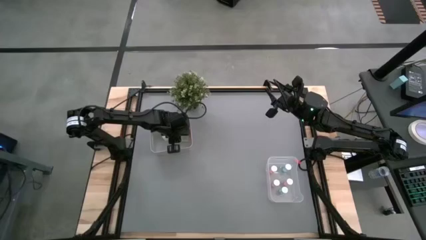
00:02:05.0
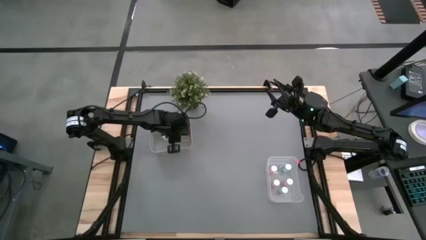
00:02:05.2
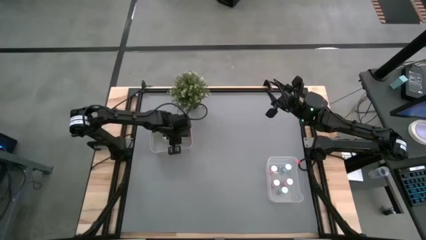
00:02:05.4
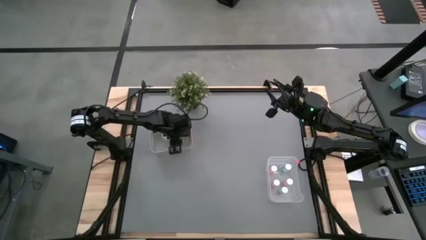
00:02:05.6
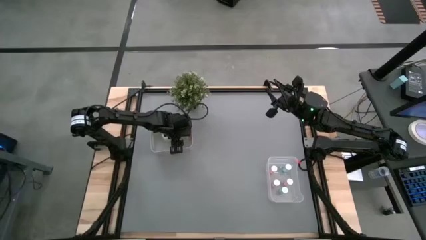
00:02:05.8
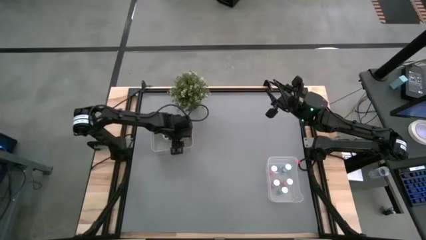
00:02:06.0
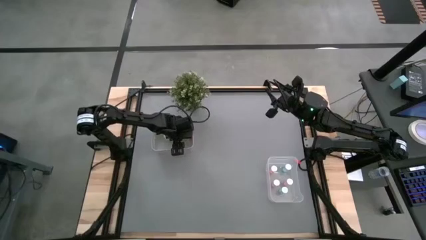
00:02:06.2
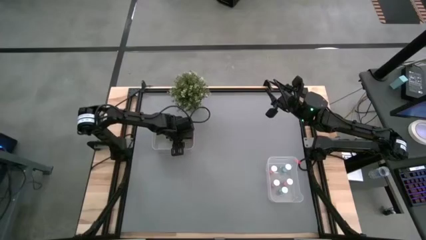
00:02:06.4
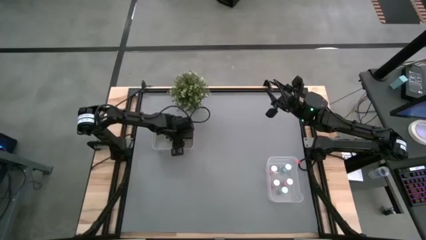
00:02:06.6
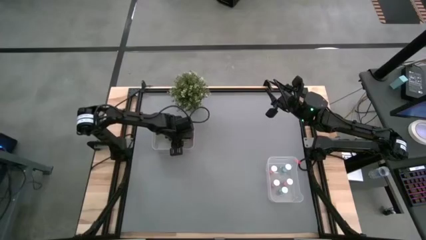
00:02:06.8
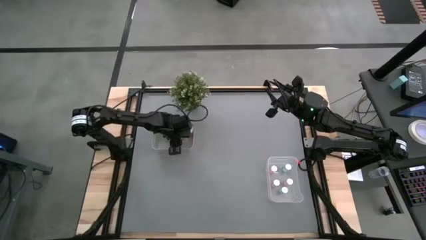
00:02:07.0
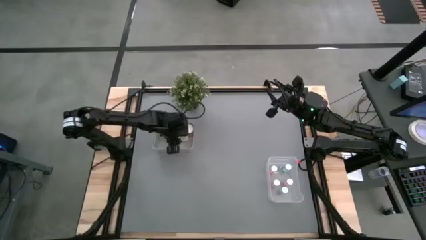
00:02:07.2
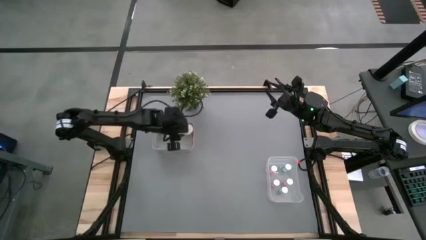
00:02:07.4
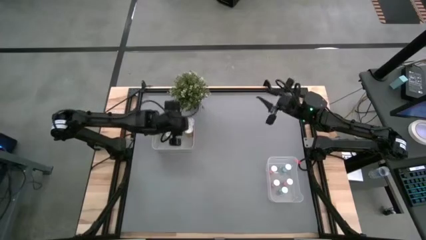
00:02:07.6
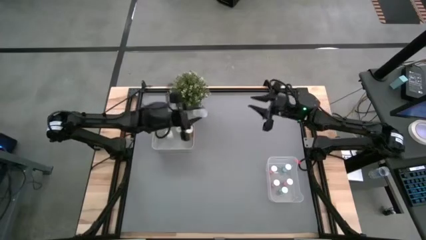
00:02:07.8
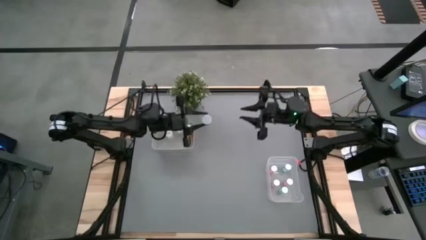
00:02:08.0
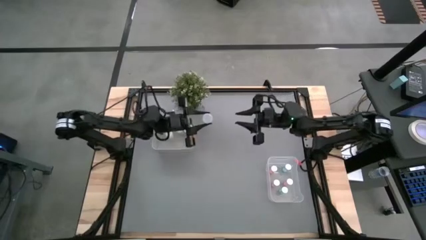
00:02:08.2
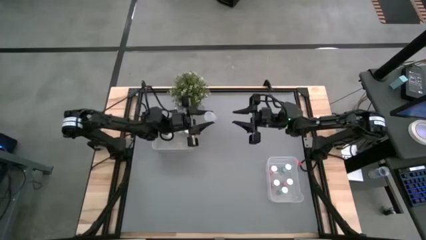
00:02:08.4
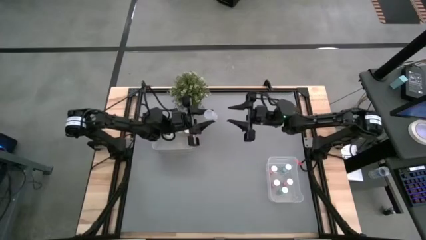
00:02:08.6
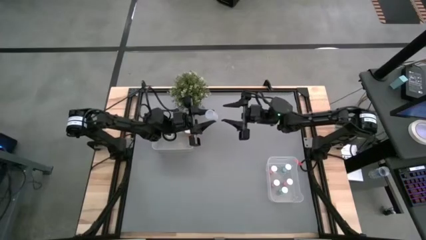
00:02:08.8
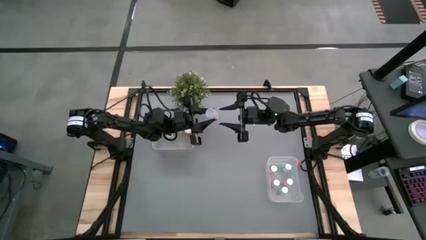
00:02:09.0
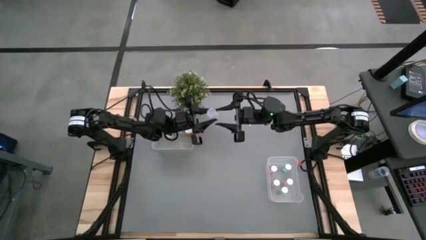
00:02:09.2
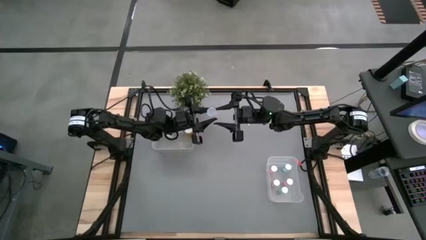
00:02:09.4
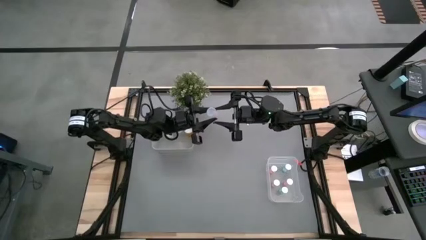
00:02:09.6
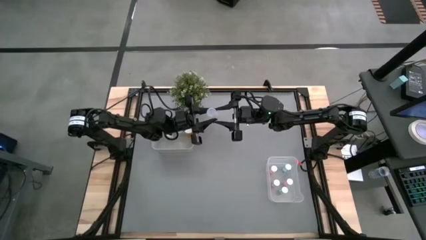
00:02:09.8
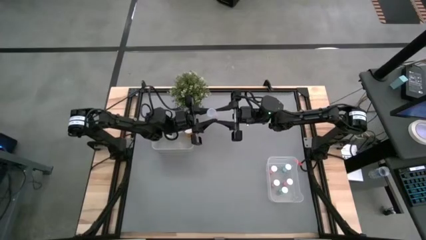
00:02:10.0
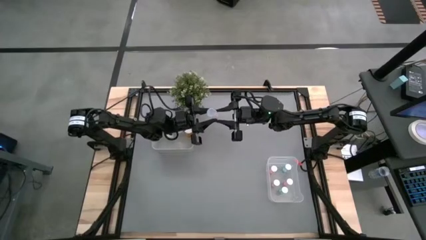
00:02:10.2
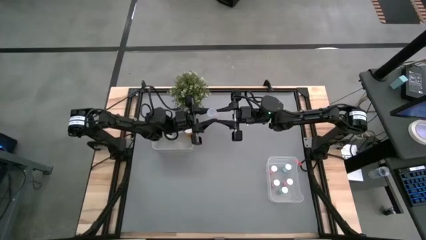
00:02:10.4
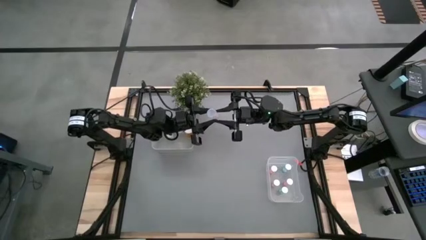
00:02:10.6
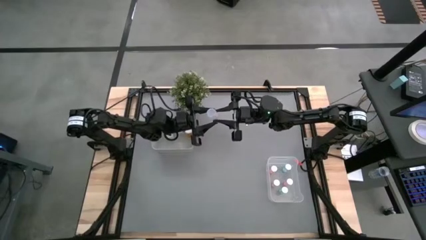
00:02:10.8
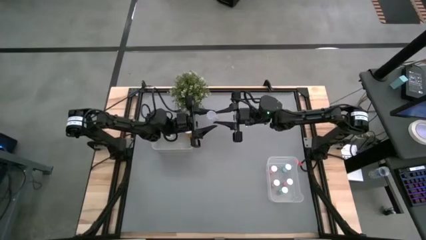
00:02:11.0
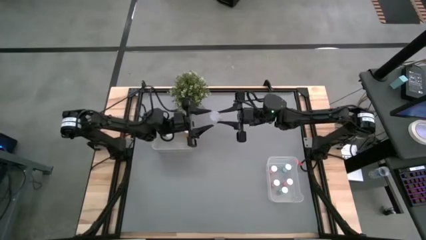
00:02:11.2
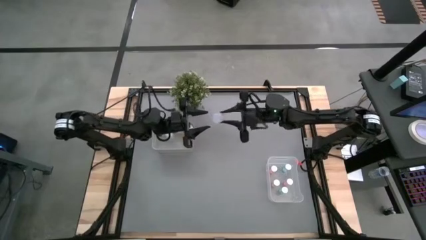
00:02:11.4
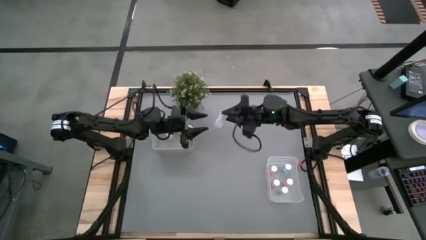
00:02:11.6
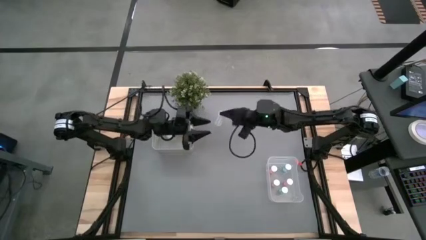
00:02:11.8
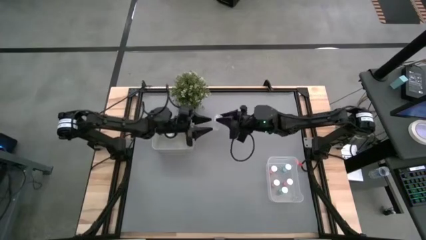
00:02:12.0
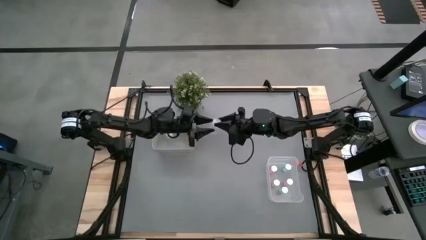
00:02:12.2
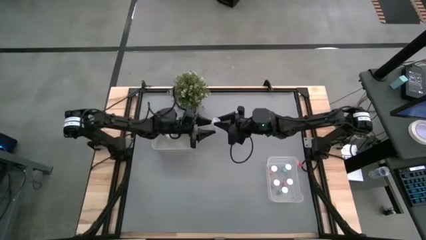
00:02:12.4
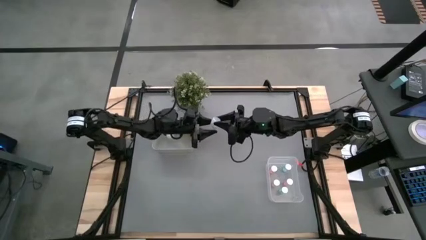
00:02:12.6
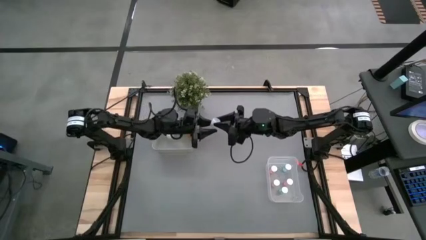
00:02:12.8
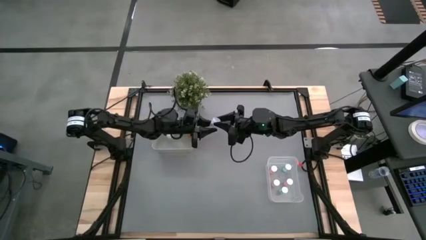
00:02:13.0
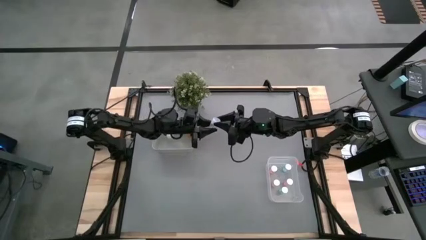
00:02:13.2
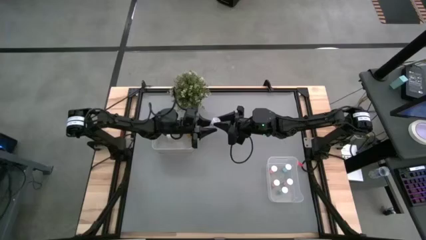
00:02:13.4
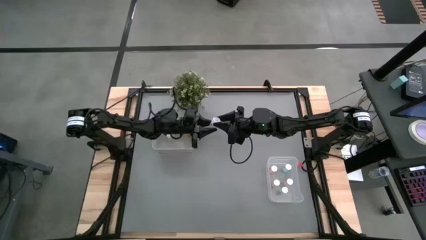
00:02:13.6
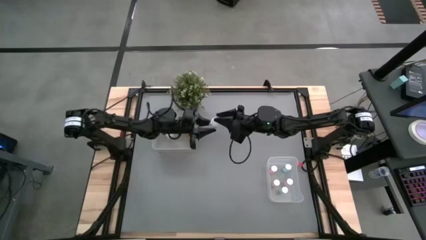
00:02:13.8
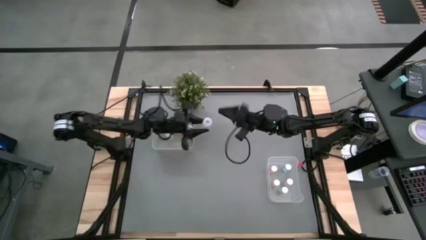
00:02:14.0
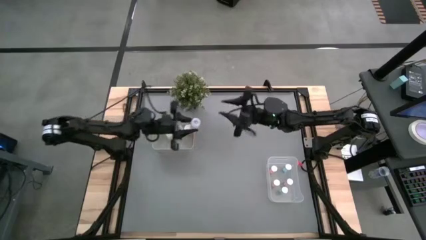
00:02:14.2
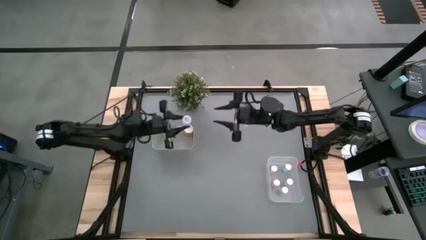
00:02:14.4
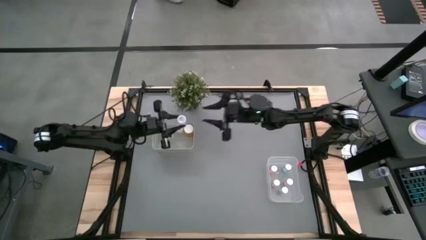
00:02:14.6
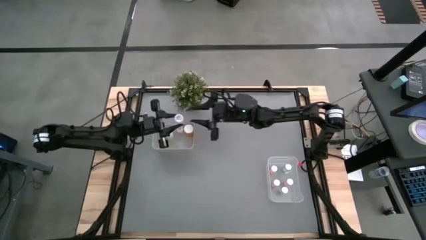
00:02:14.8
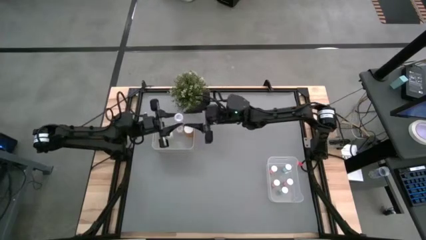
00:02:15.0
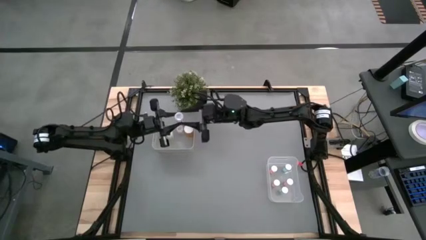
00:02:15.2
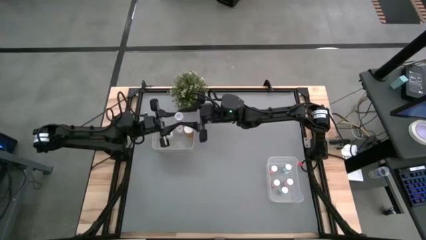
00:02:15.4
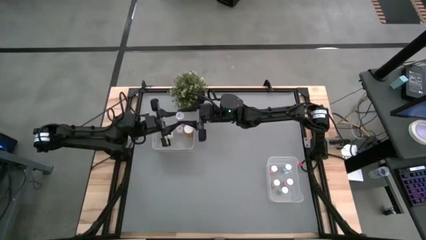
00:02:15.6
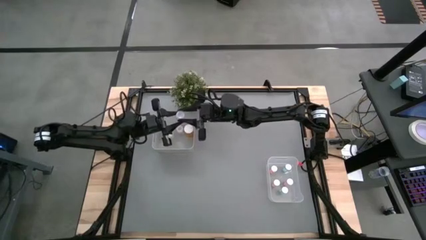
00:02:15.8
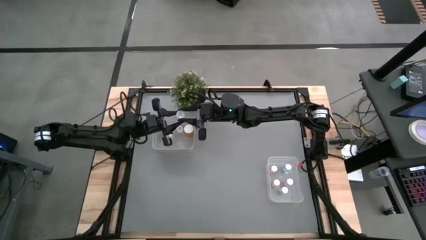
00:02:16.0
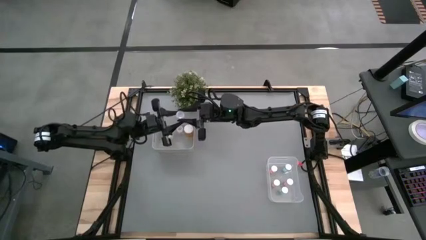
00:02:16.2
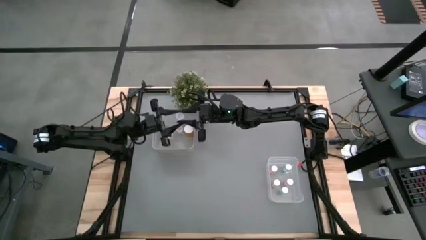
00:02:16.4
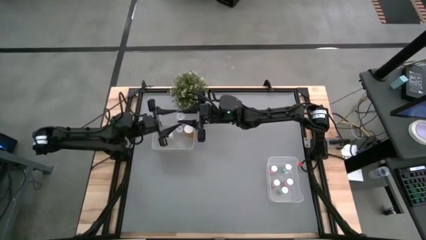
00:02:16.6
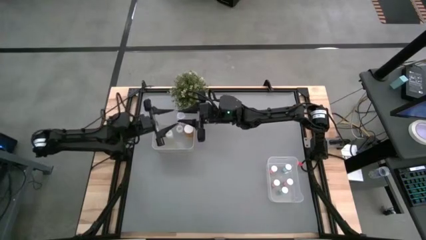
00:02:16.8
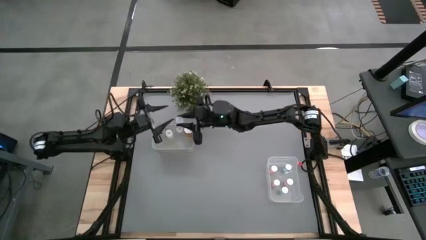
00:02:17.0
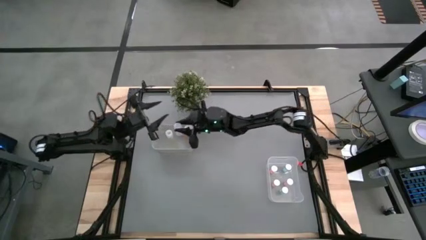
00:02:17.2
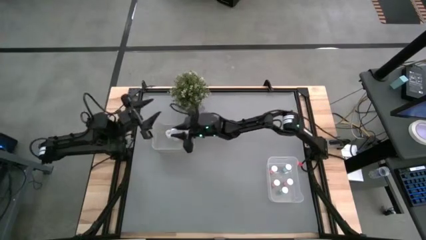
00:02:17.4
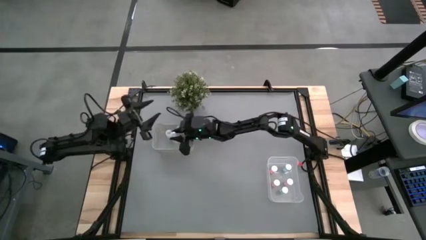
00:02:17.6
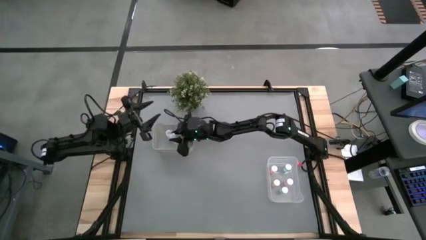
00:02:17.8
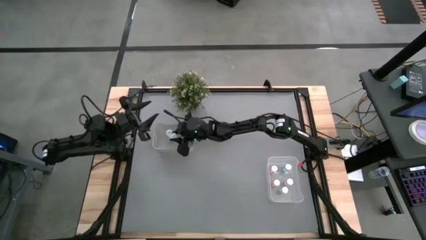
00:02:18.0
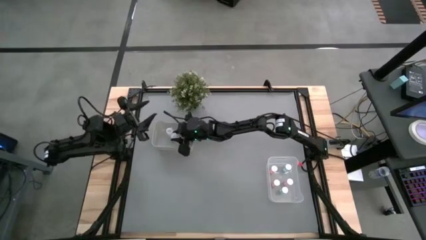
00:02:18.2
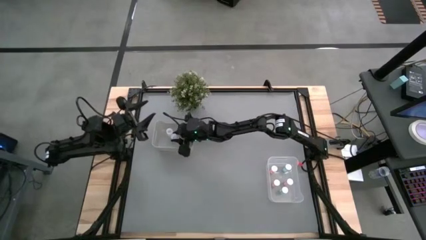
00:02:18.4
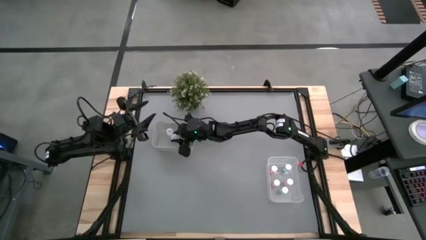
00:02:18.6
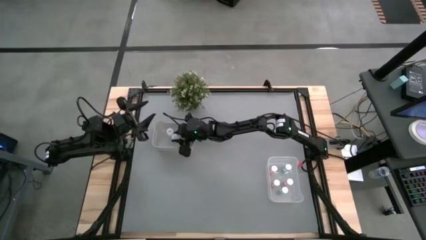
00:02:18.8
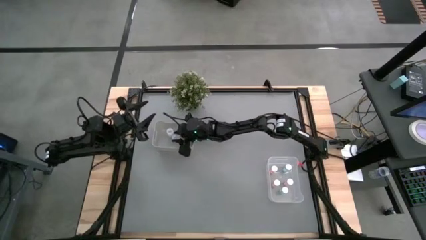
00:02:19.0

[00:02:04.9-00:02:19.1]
Task: Pick and place medicine bottles into bin by pill shape (circle, oval)
Put the transparent pill bottle into the gray bin

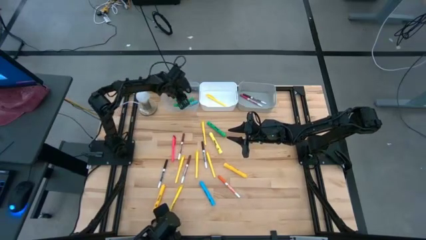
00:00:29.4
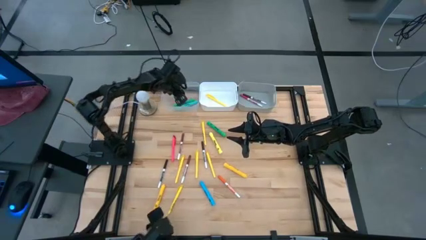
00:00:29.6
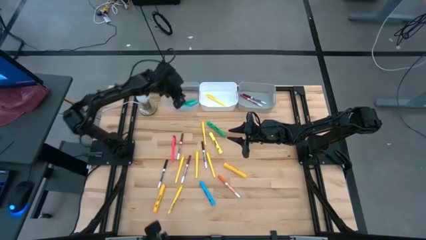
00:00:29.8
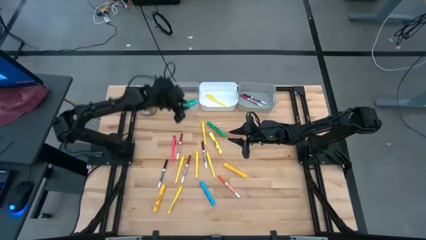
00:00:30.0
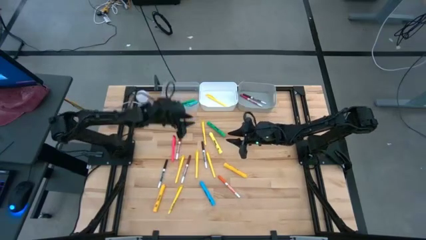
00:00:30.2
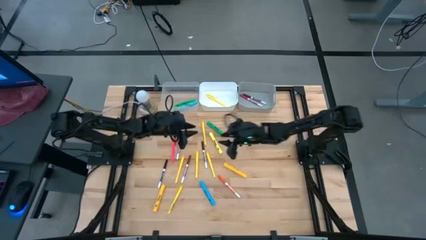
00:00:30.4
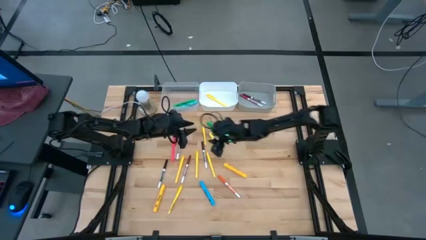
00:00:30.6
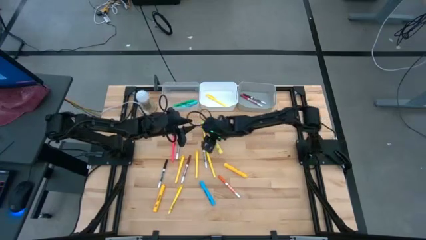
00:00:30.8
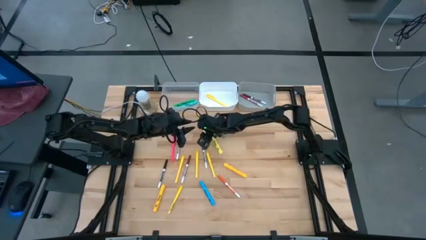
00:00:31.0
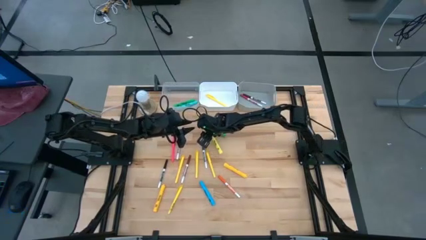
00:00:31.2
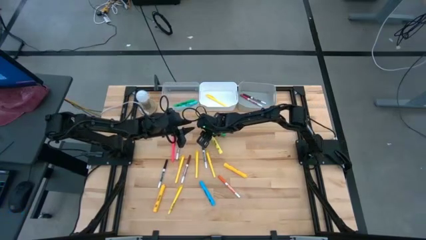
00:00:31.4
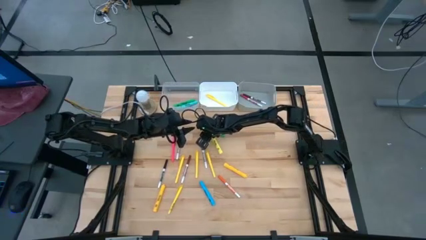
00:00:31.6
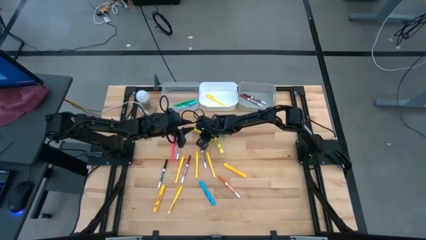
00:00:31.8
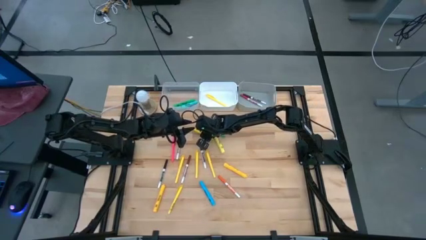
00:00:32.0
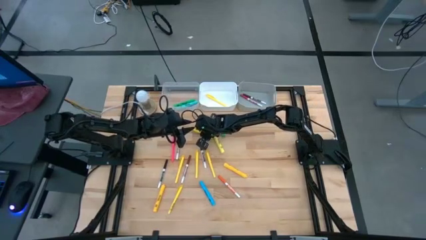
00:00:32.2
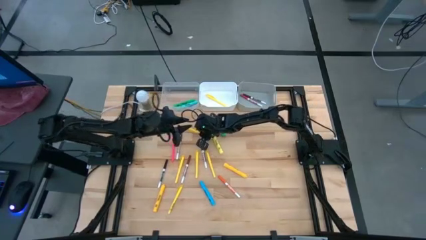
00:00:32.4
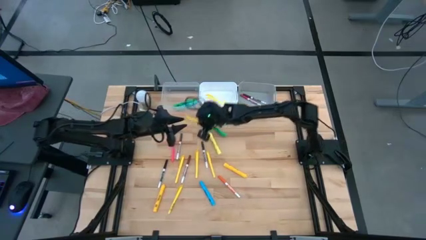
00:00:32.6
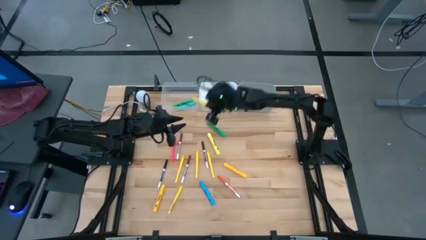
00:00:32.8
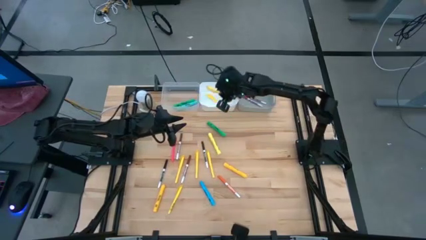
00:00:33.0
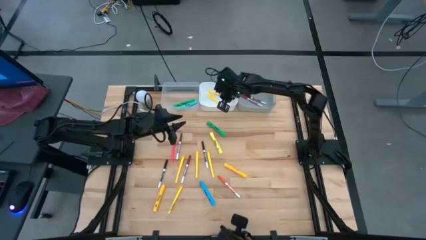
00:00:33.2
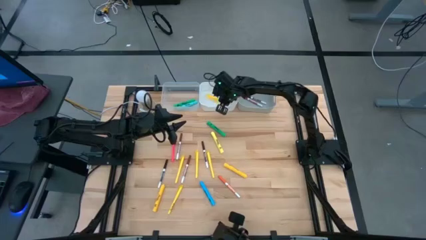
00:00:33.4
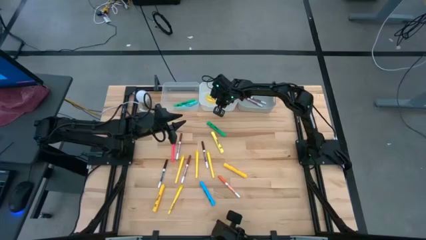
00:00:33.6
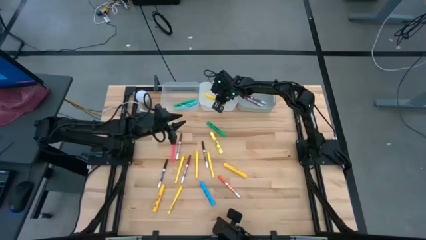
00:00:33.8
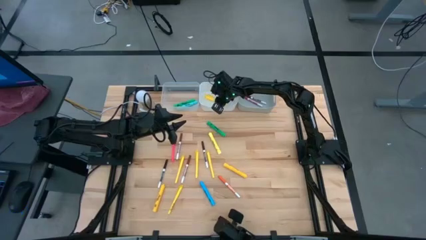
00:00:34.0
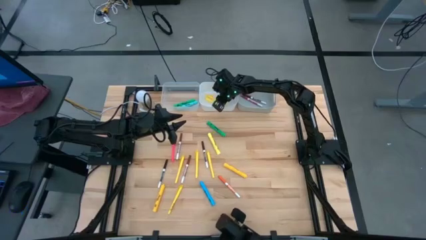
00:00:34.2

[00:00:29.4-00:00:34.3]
Task: Pick & Place Markers
Put the yellow pen into the white bin
